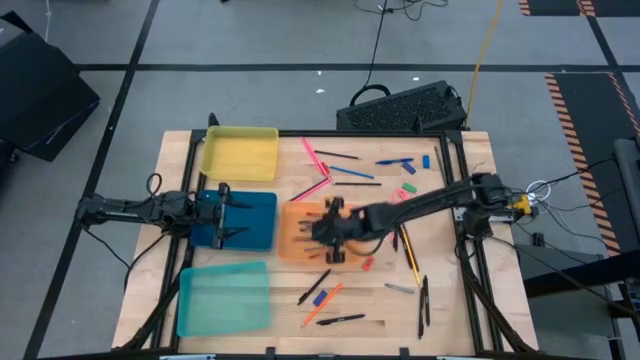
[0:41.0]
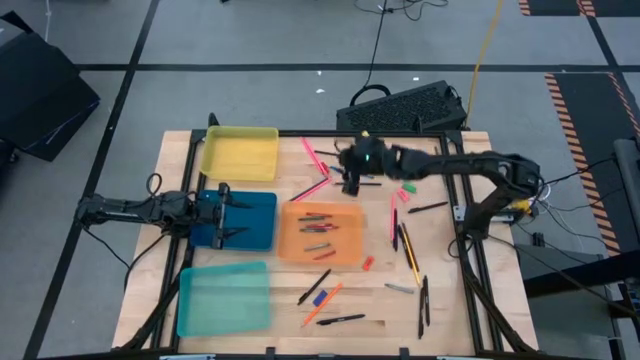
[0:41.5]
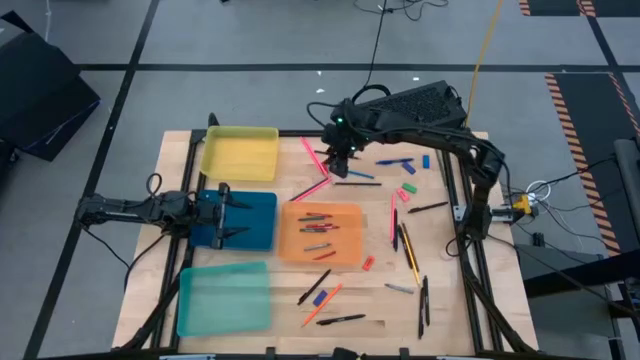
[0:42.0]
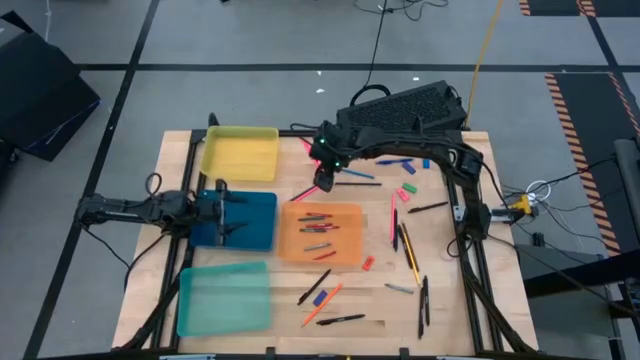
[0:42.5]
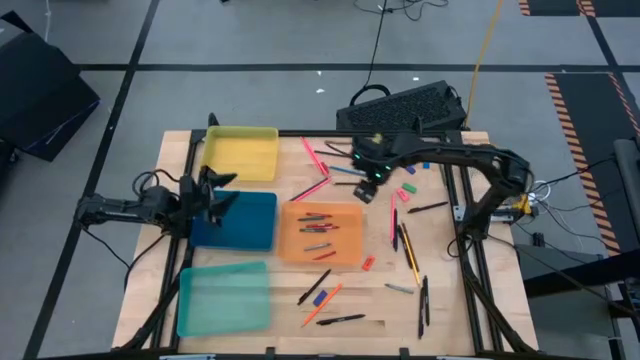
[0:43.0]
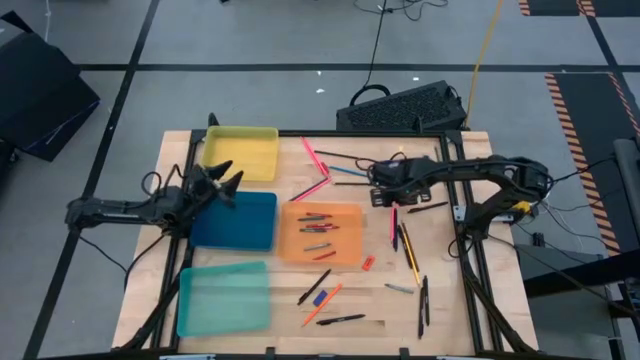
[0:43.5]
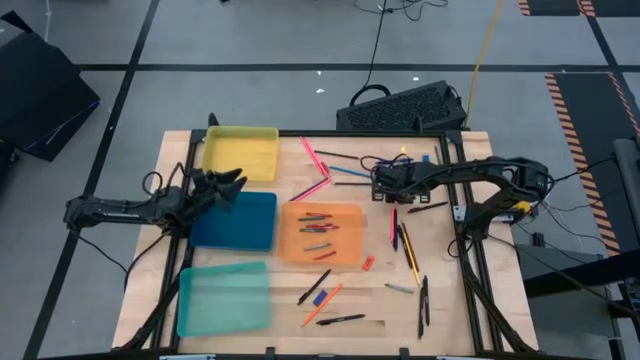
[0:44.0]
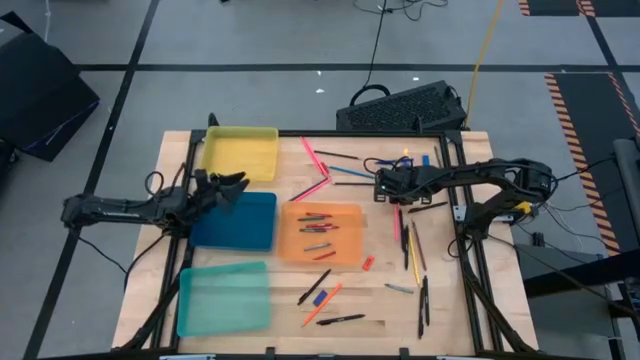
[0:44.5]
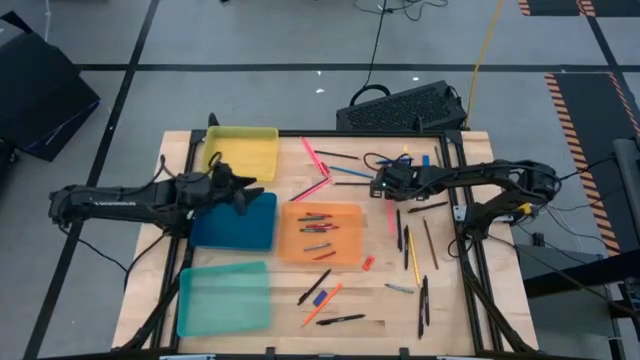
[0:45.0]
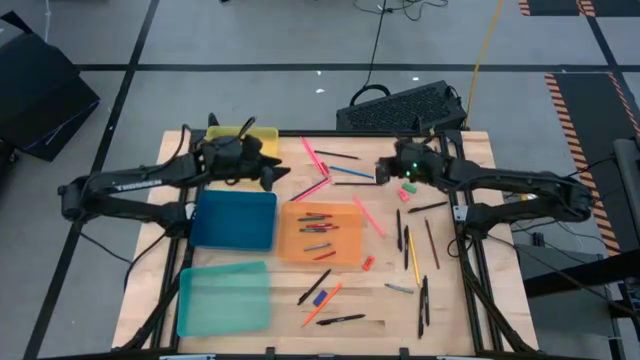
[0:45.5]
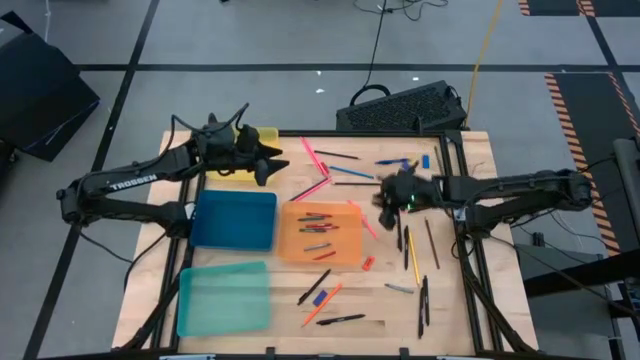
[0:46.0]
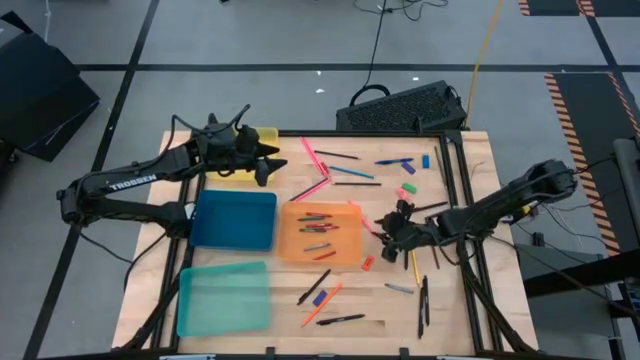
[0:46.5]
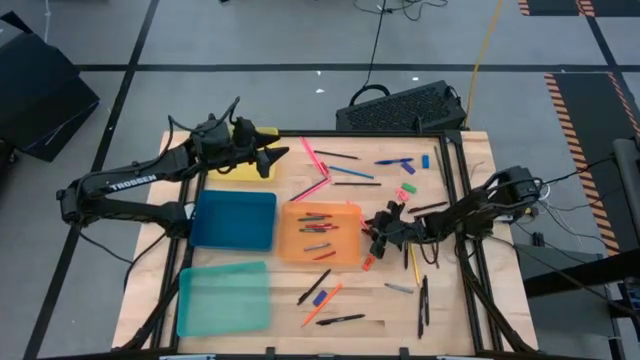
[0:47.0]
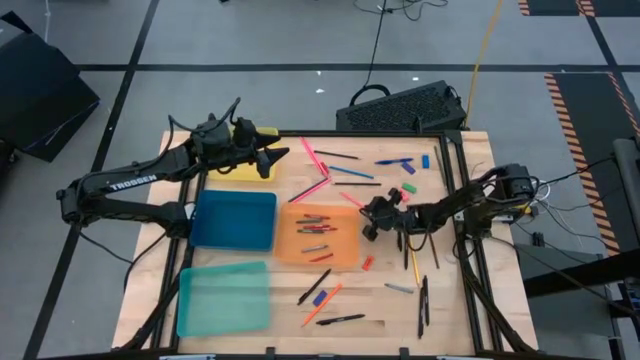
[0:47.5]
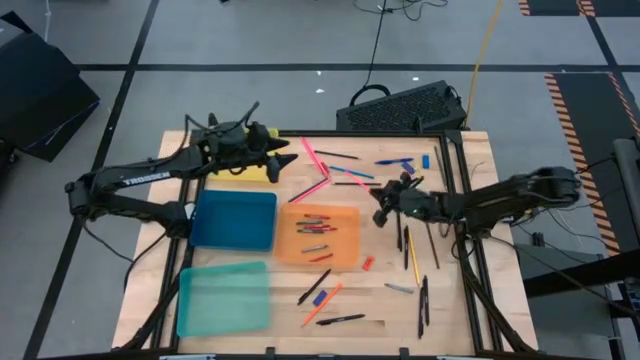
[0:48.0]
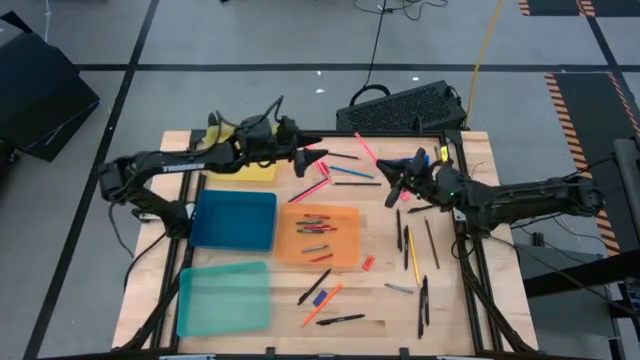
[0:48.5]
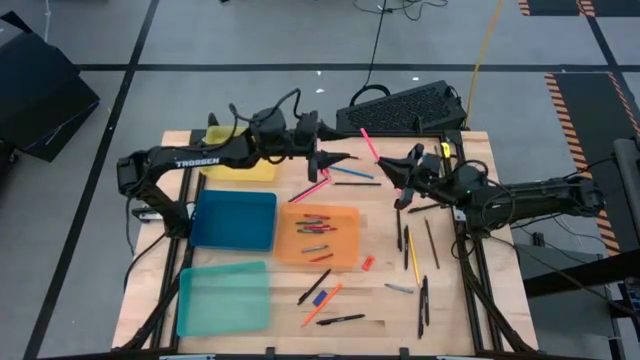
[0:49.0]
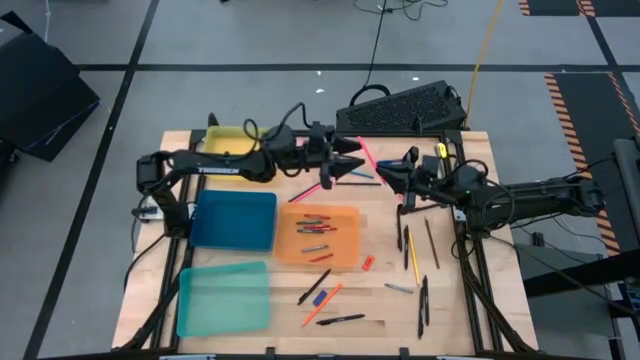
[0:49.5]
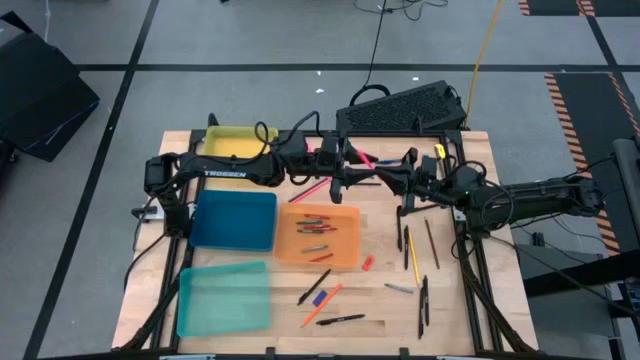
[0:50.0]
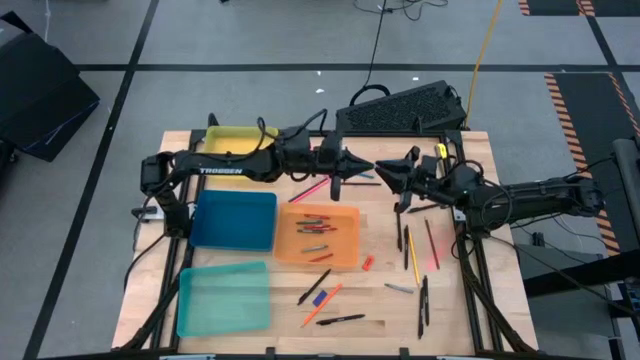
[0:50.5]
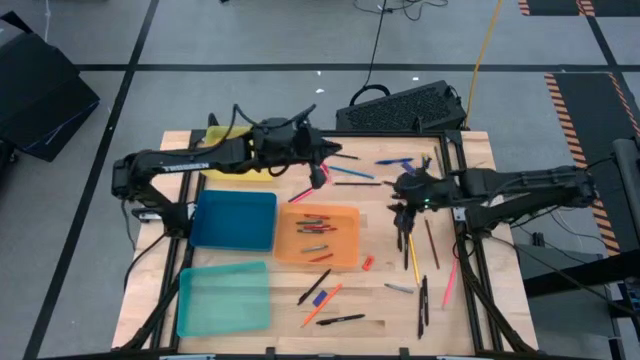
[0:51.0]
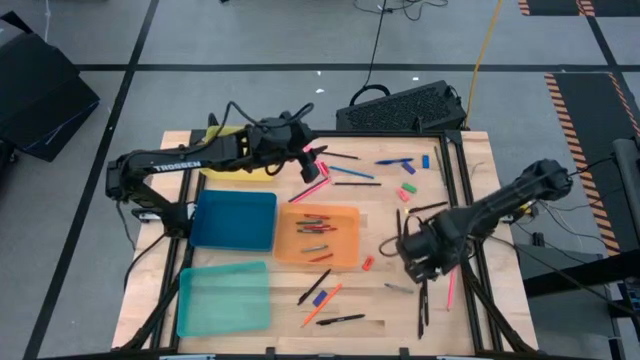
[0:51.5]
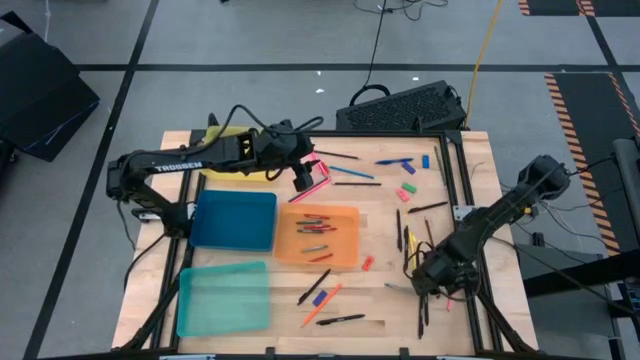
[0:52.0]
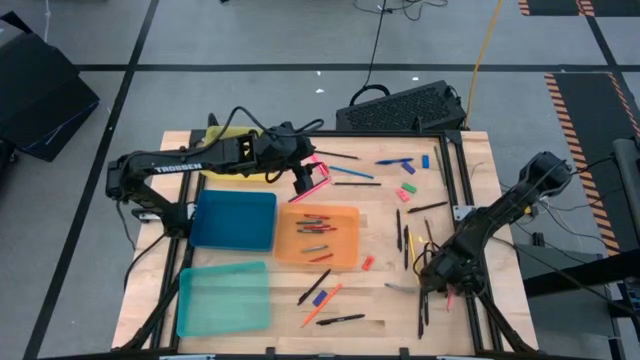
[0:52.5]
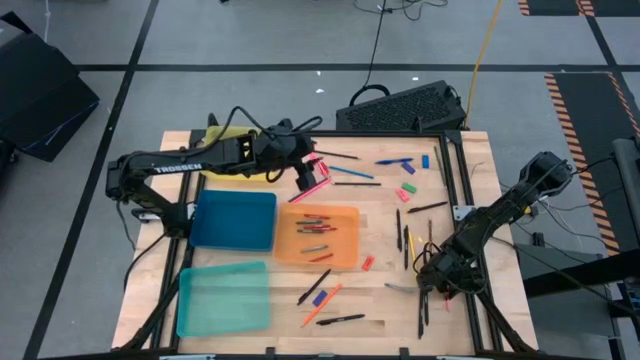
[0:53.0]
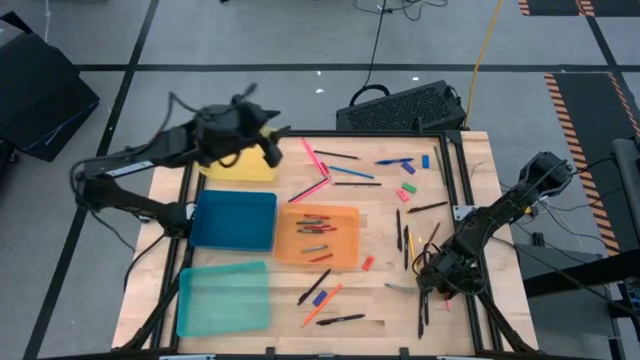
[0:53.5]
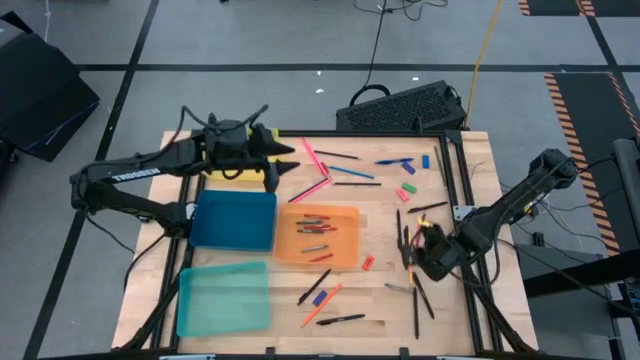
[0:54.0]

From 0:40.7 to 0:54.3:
Task: Sort crayons/erasers/pens/pencils in bins
Put the pink pencil into yellow bin

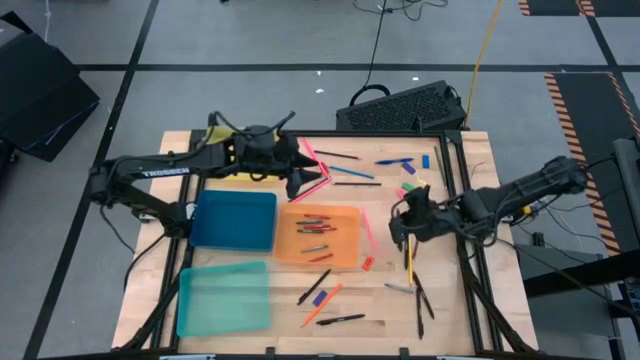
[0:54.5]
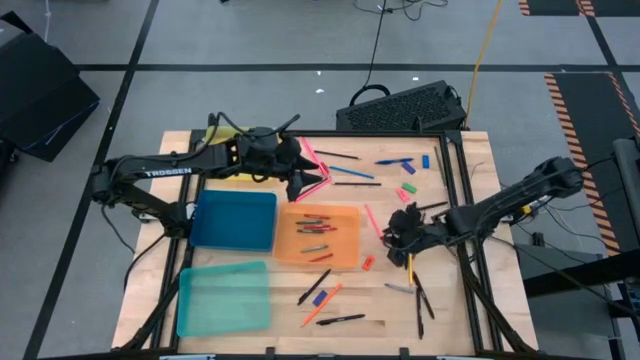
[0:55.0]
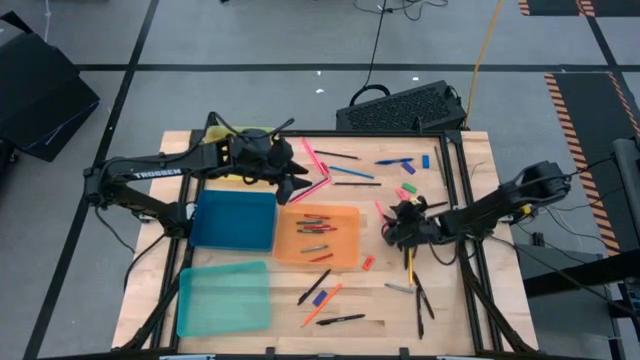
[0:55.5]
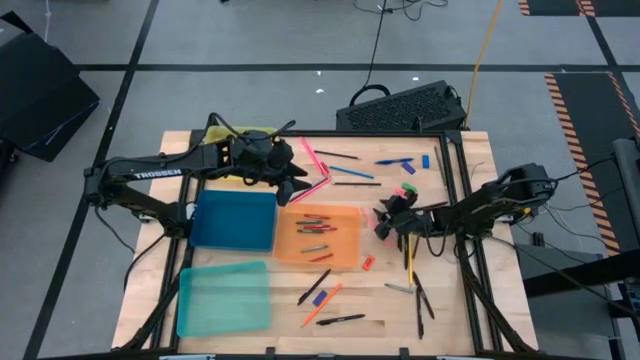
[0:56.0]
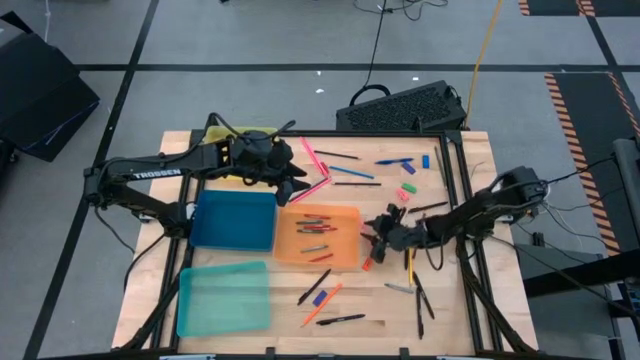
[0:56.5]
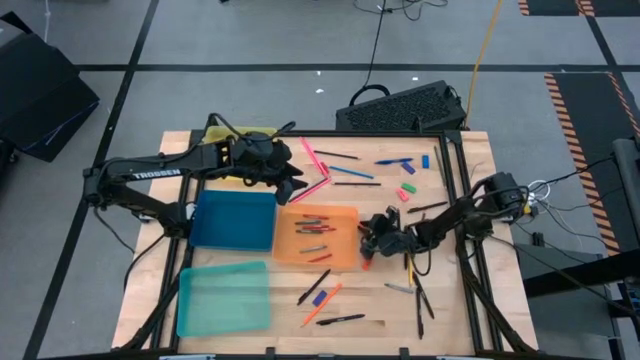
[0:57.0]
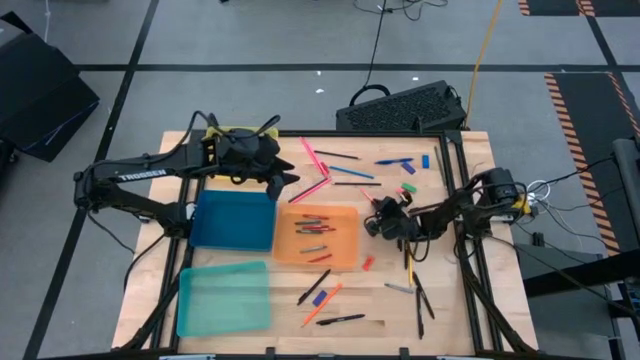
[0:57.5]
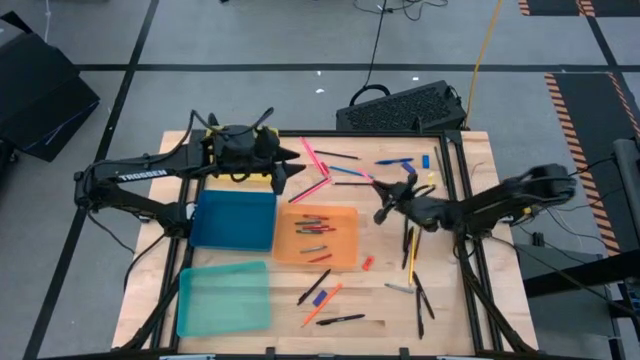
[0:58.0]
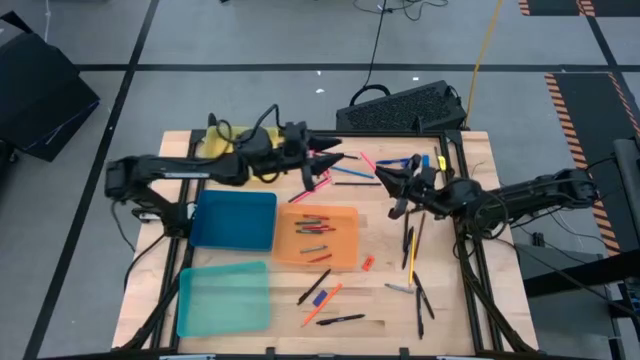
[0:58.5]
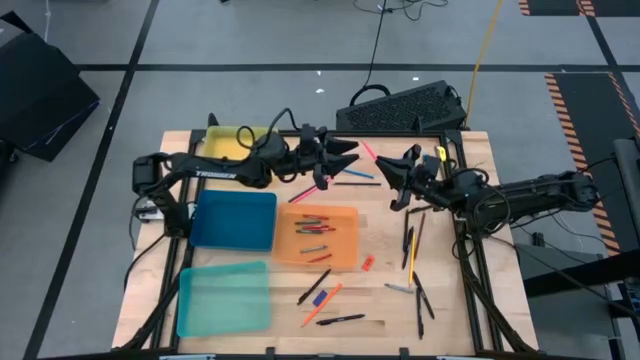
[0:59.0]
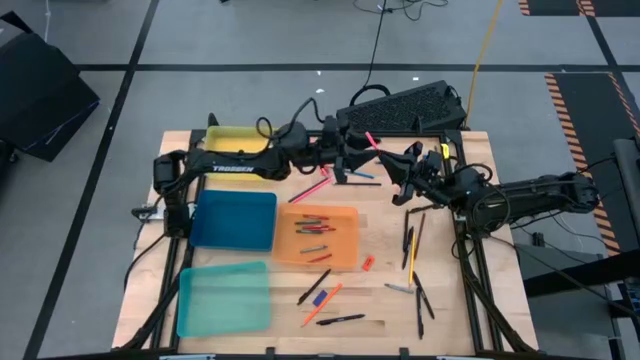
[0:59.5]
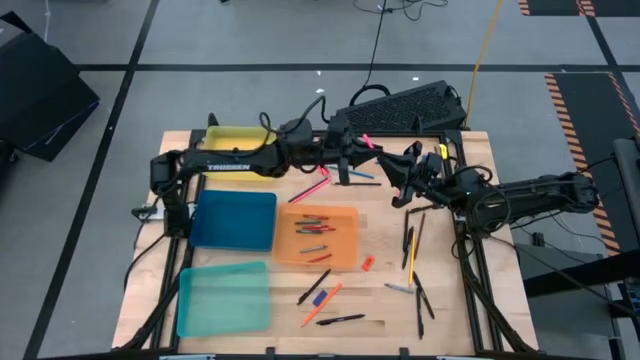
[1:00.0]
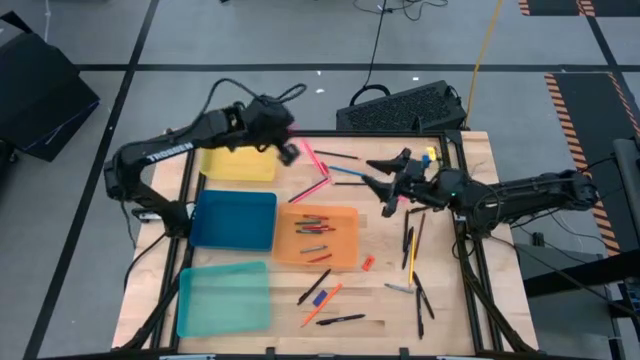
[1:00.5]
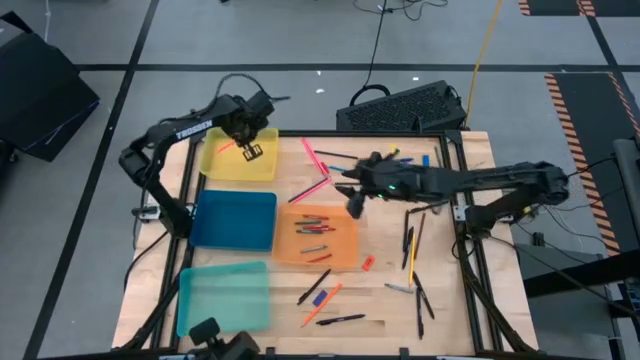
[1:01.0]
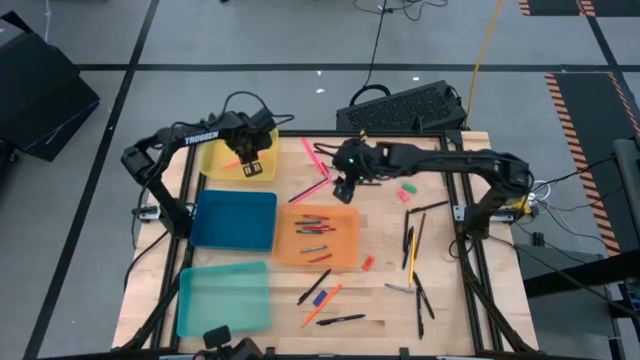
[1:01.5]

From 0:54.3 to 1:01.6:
Put the pink pencil into yellow bin

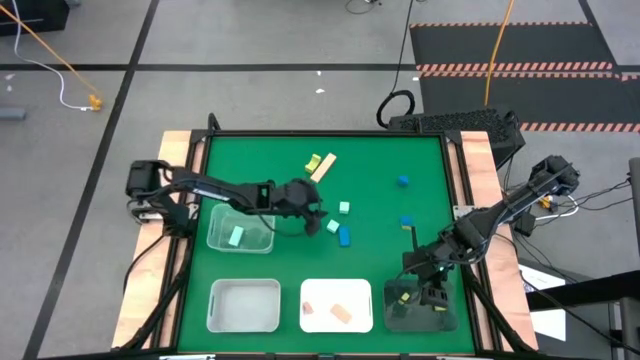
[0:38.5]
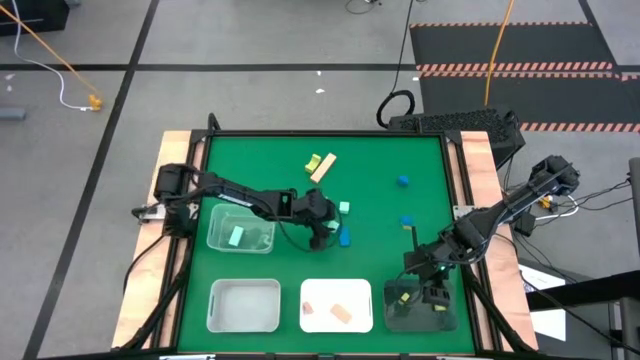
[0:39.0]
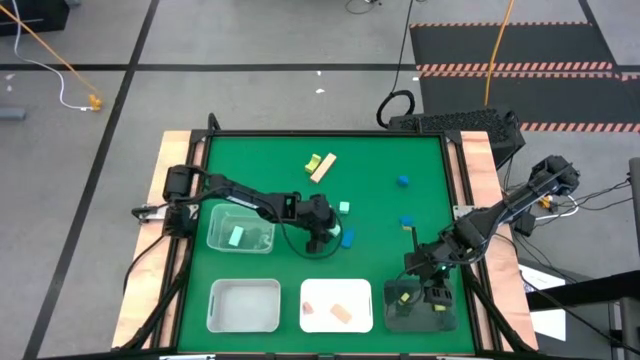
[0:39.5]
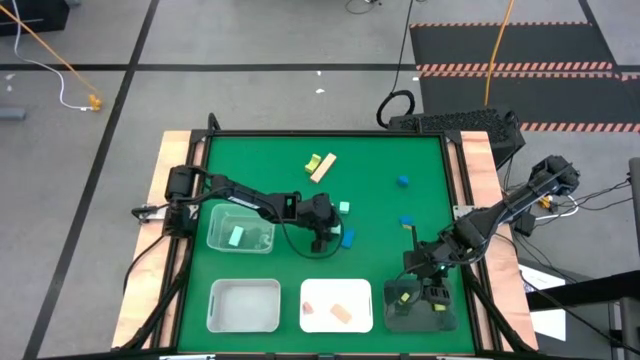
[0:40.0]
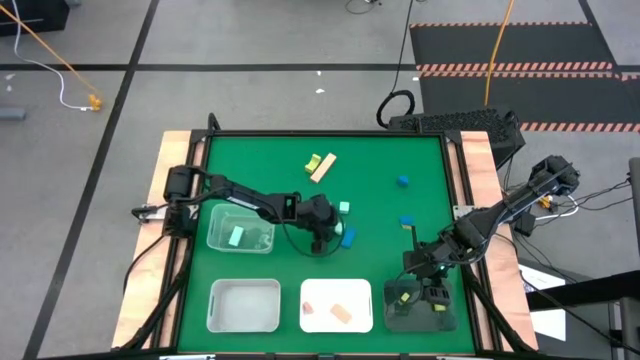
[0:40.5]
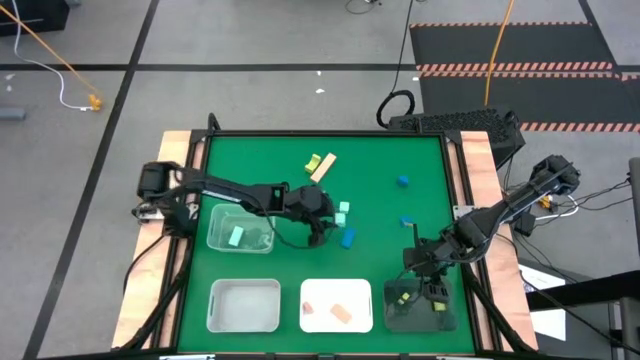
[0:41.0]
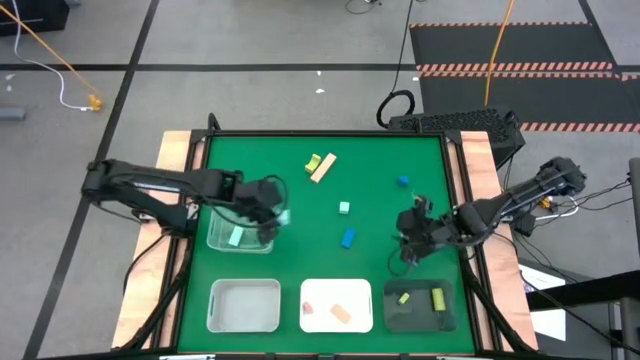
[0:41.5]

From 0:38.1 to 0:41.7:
Task: Sort & place blocks by color
Put the bottom light blue block into the transparent bin
